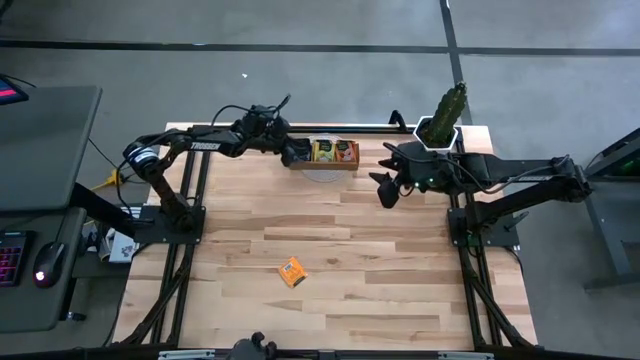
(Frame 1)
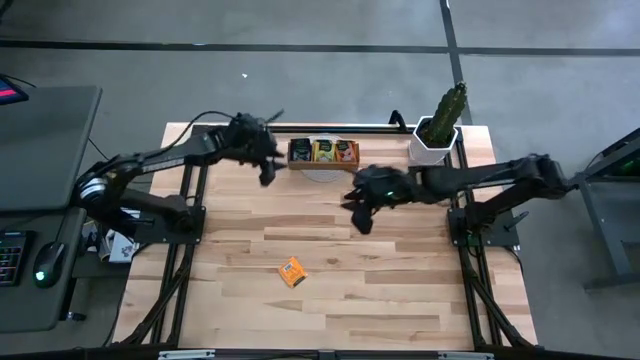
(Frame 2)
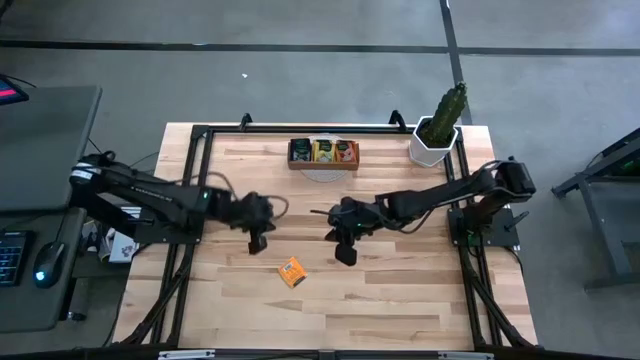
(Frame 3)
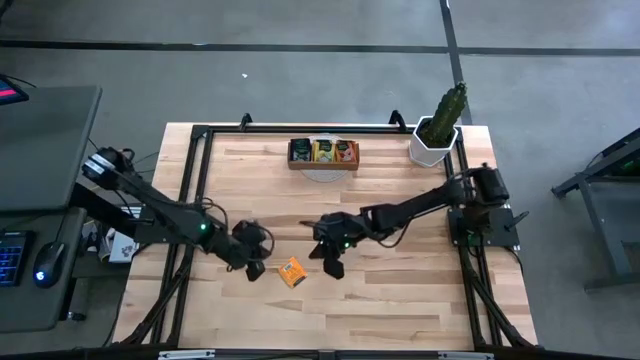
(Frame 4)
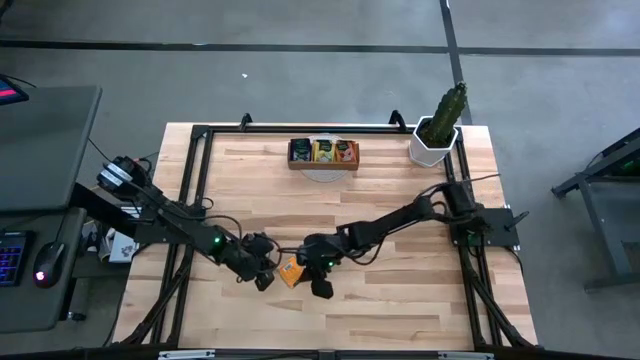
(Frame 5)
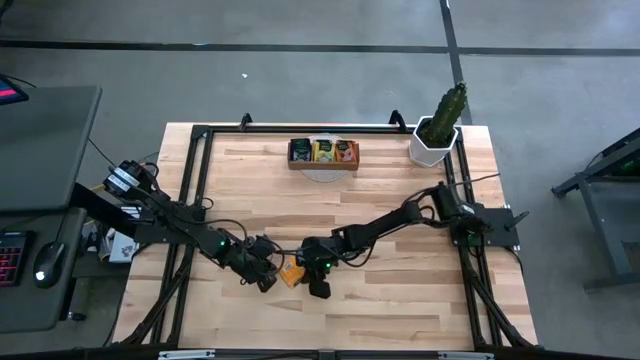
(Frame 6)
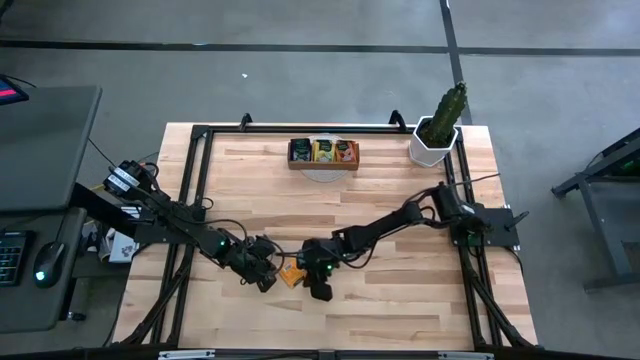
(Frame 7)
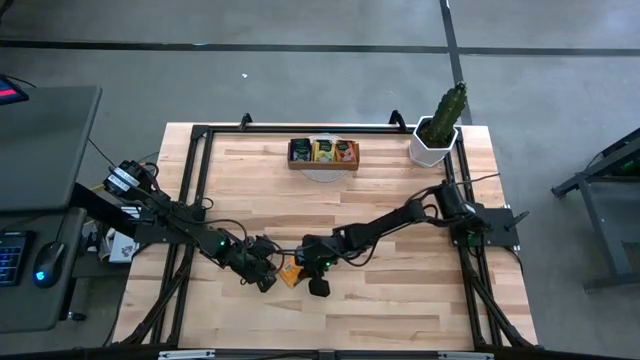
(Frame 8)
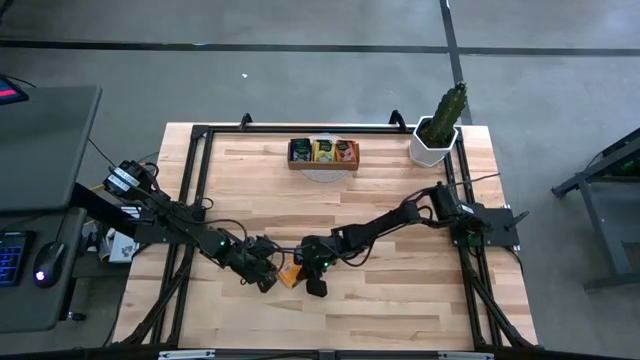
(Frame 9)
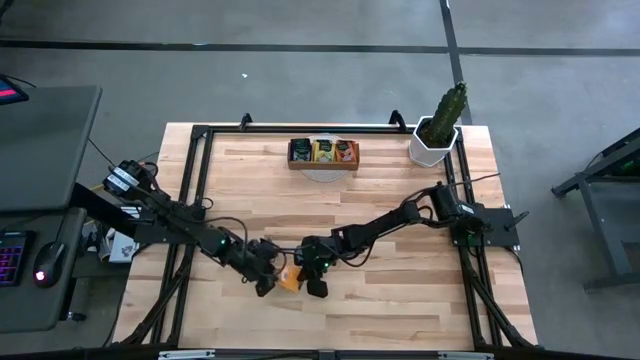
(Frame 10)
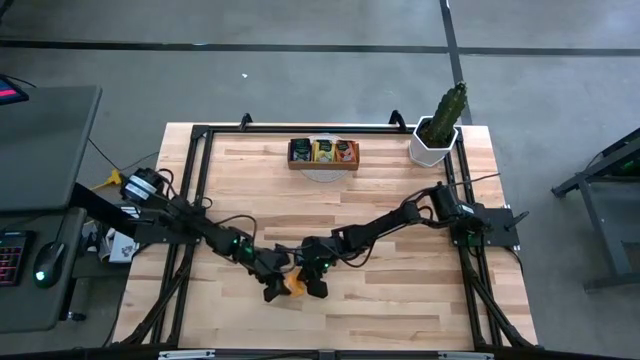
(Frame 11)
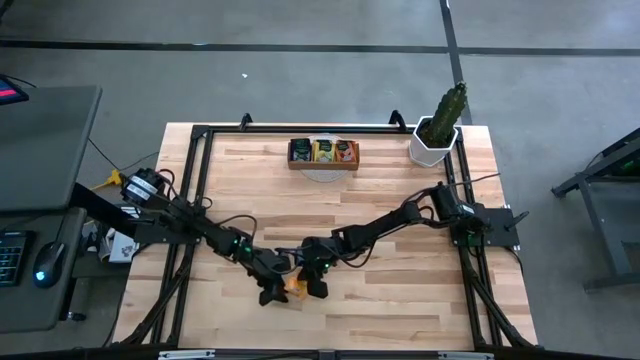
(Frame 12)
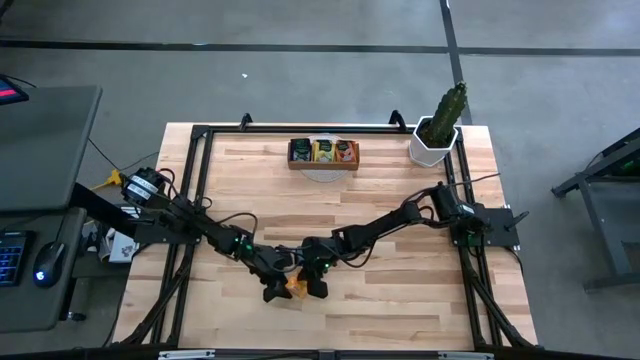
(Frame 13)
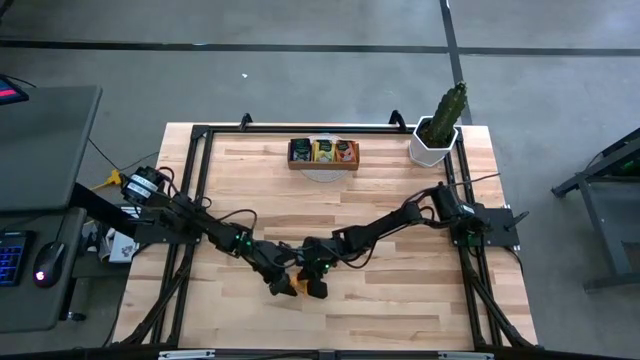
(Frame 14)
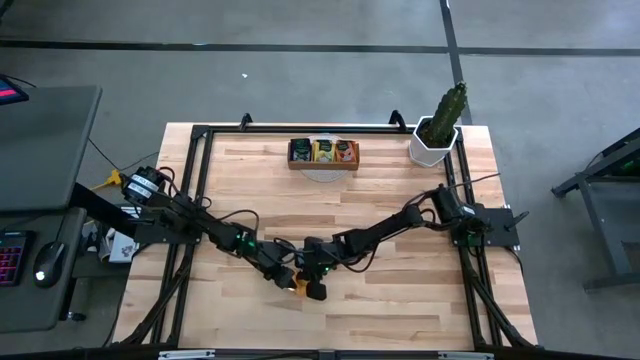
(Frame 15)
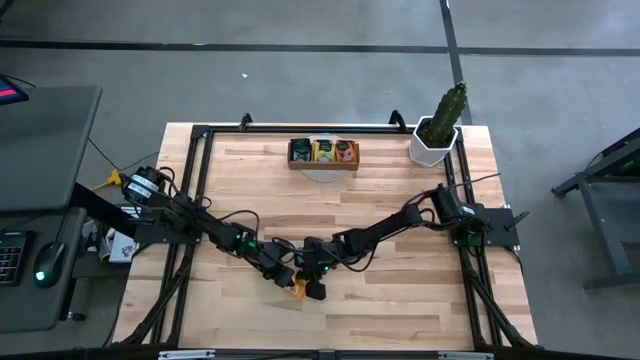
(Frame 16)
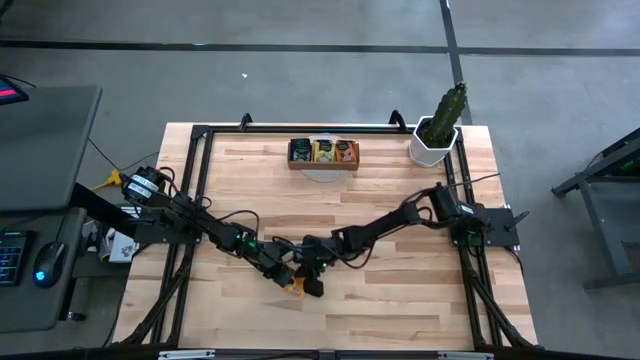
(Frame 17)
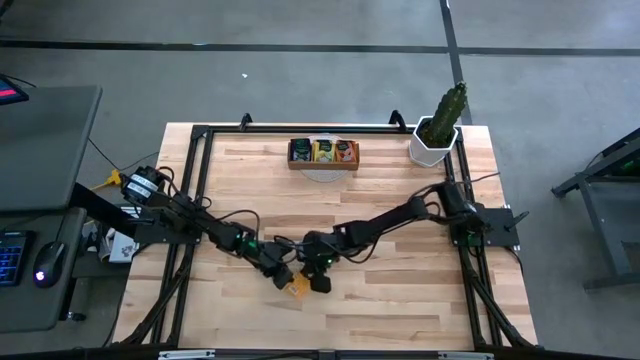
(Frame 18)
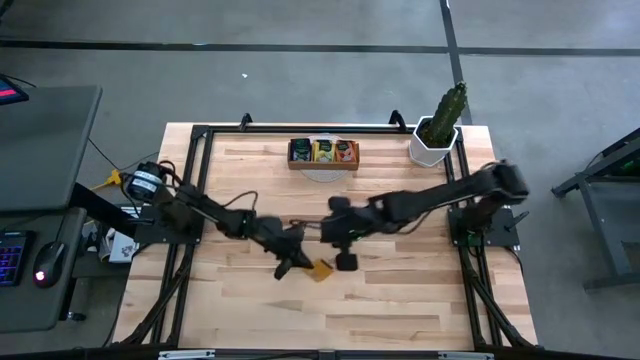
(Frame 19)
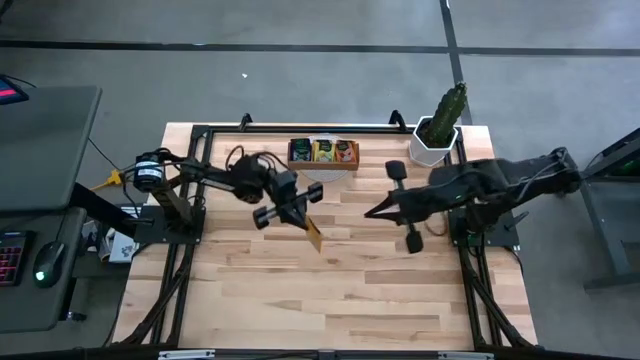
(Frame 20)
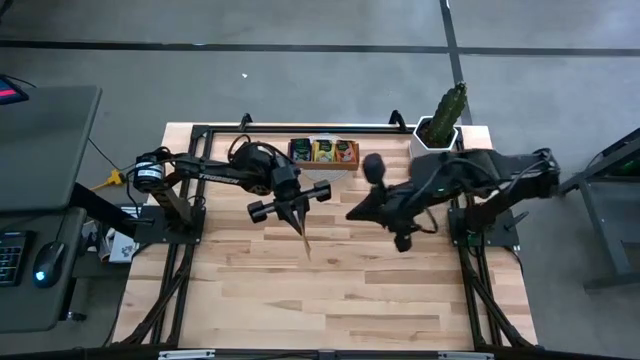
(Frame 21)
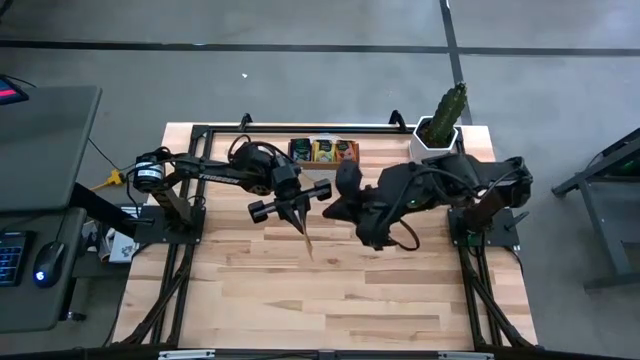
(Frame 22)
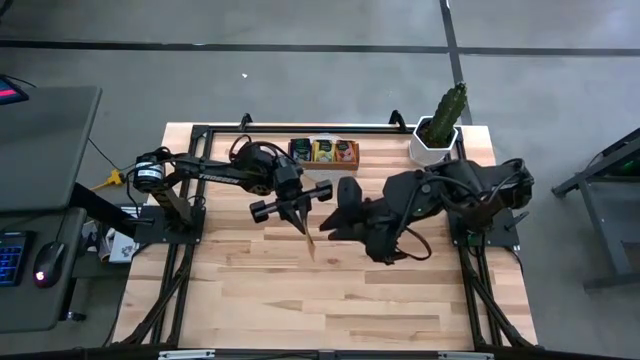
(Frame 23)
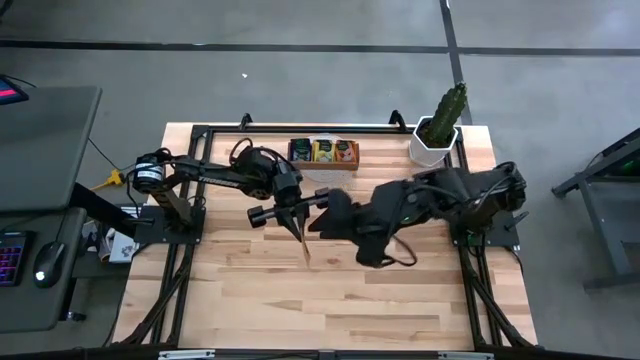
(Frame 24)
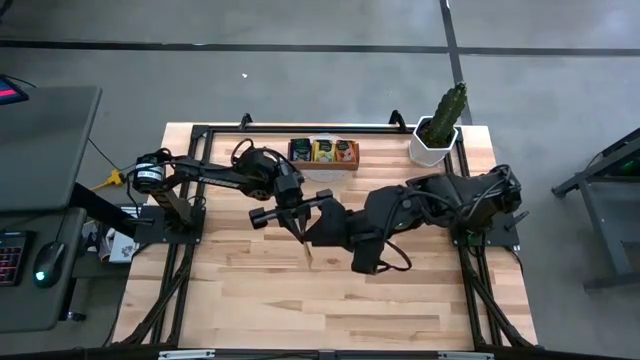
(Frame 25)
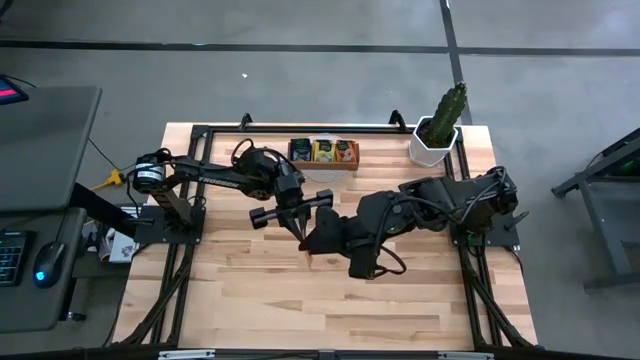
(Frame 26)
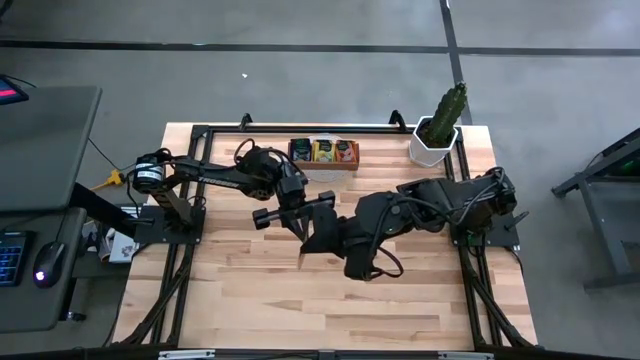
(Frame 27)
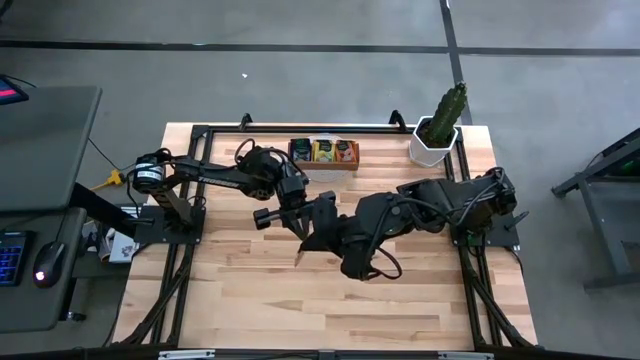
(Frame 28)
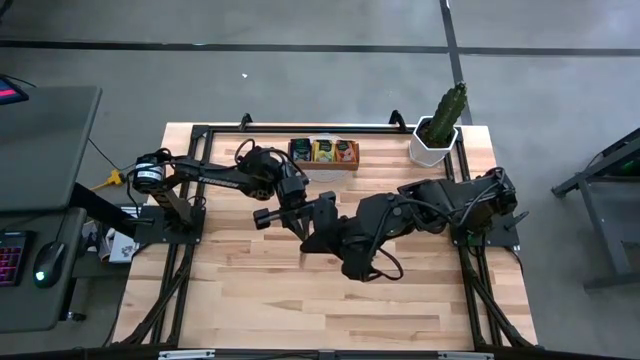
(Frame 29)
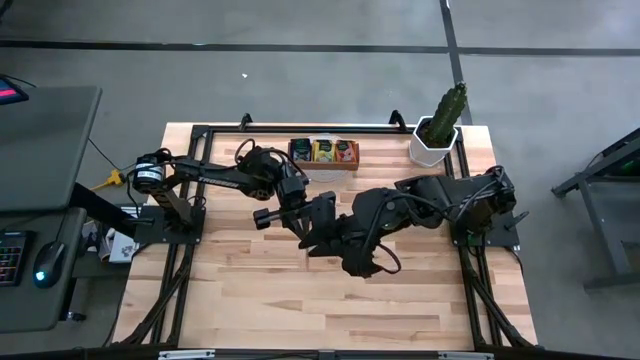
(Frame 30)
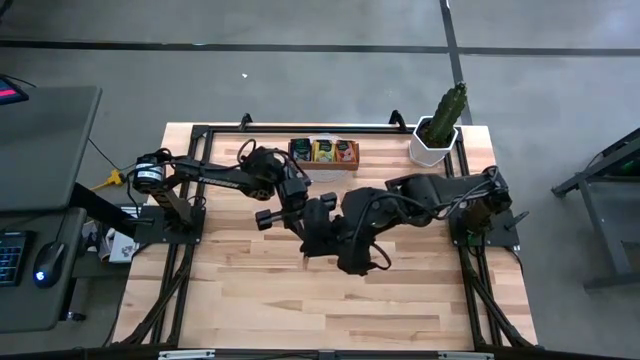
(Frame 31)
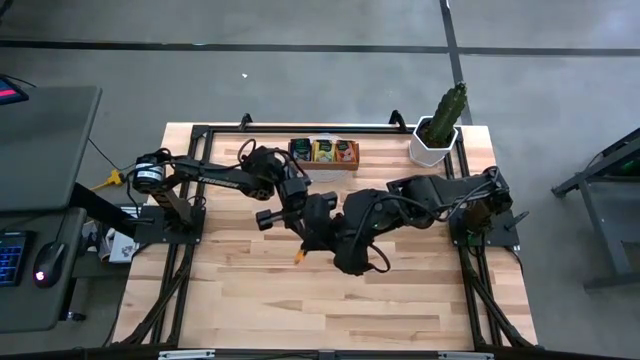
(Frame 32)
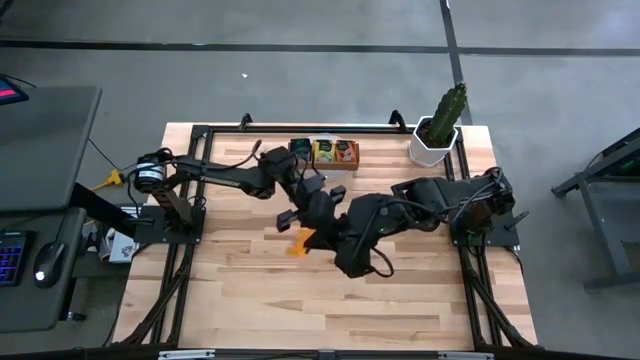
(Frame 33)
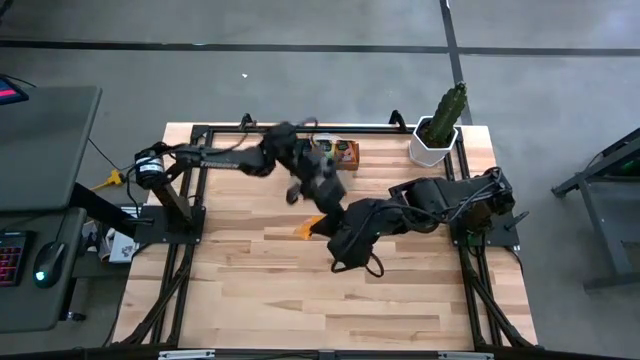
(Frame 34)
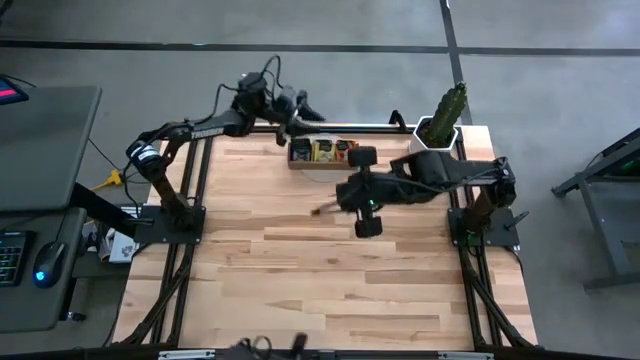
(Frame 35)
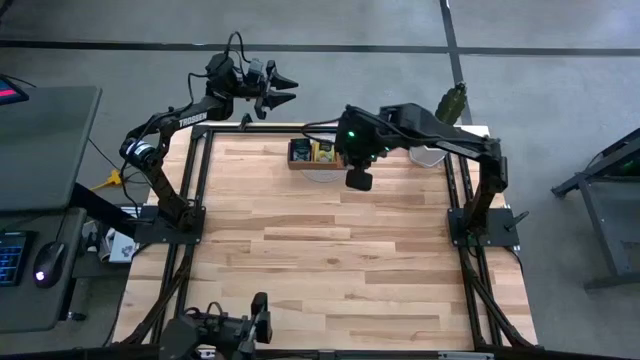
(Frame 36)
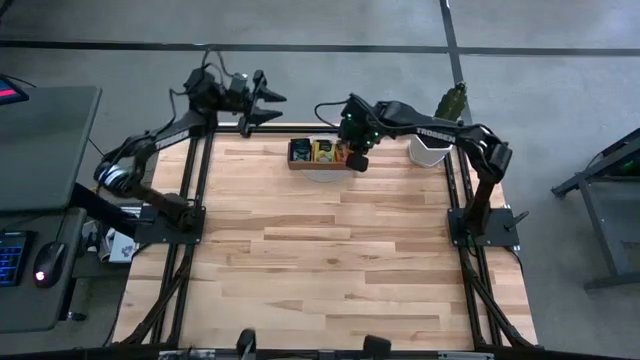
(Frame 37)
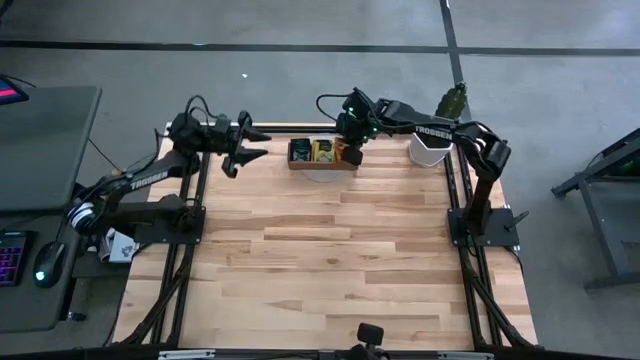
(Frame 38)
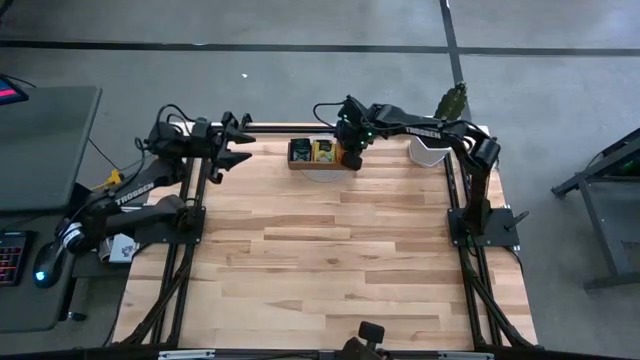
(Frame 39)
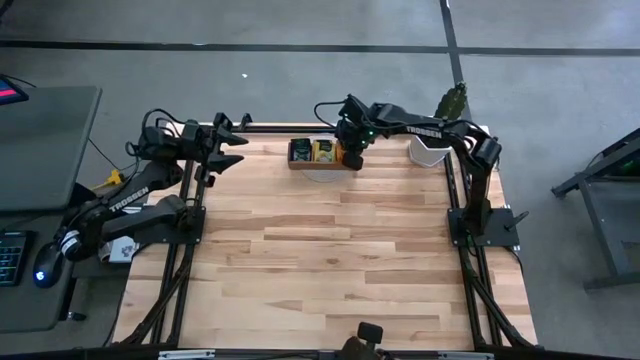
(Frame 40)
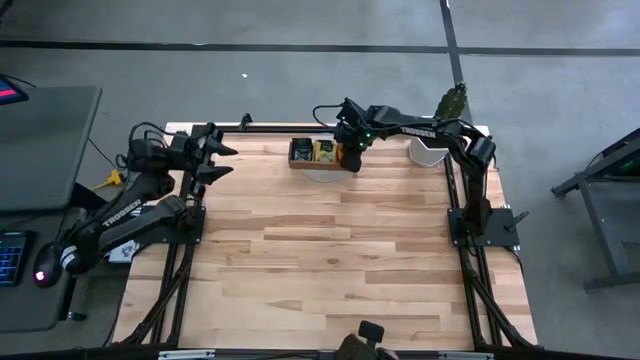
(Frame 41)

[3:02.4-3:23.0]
Task: Pick & Place Tea
Put the orange tea bag in the right compartment of the organizer
